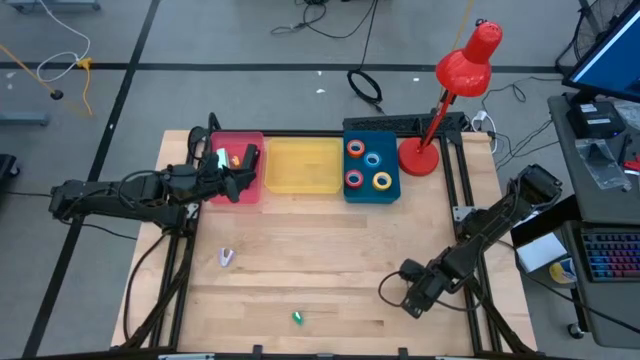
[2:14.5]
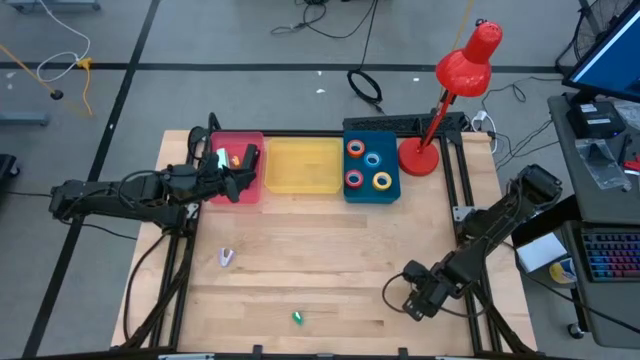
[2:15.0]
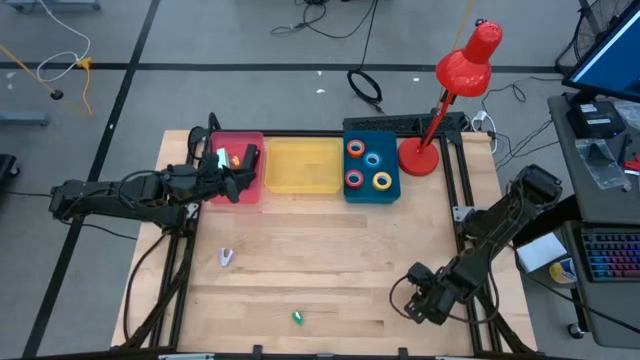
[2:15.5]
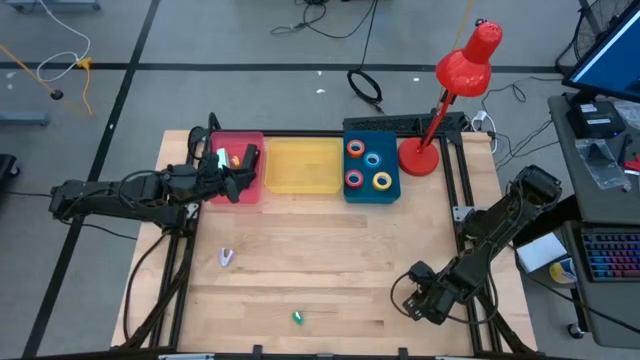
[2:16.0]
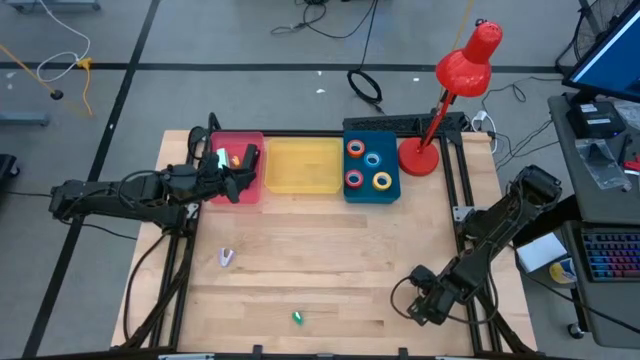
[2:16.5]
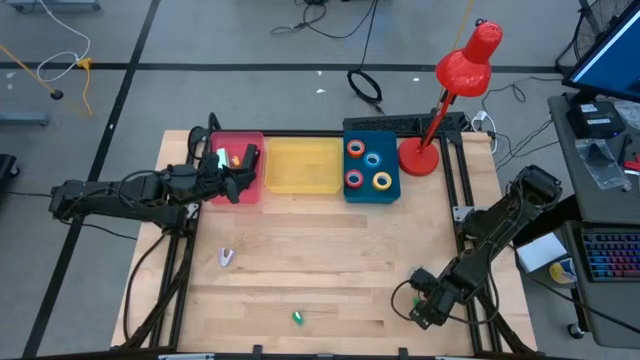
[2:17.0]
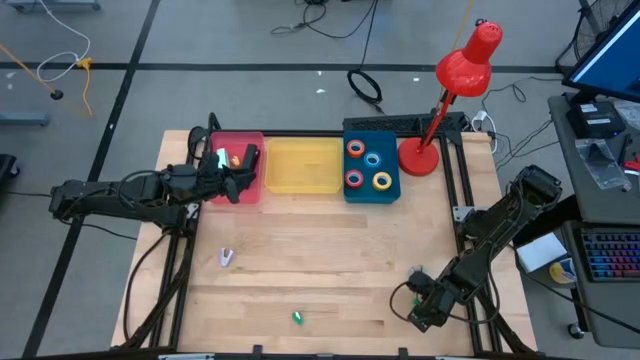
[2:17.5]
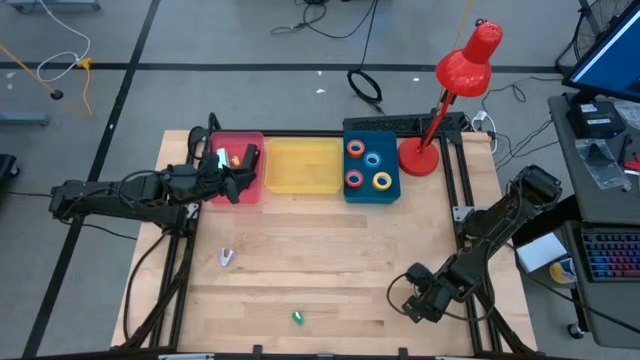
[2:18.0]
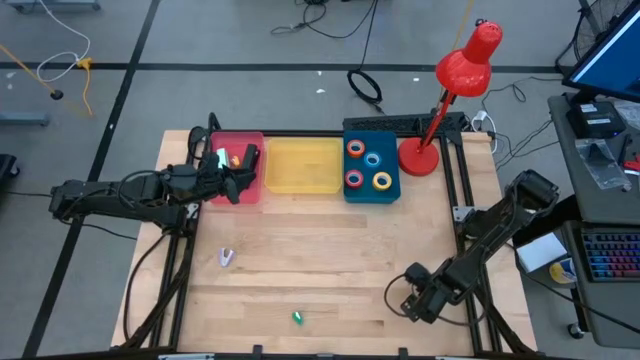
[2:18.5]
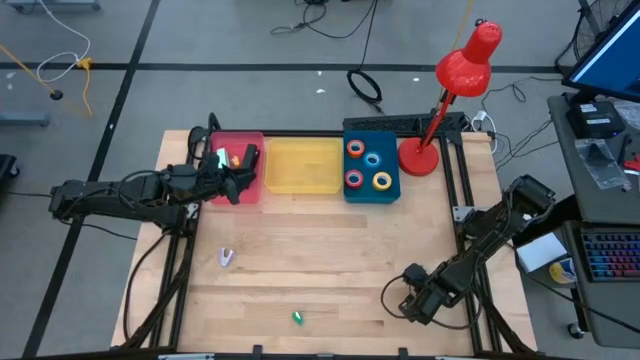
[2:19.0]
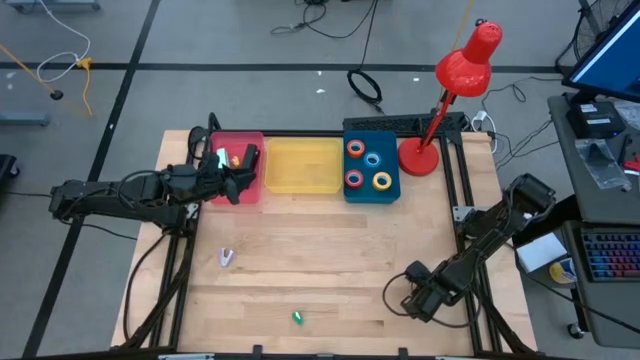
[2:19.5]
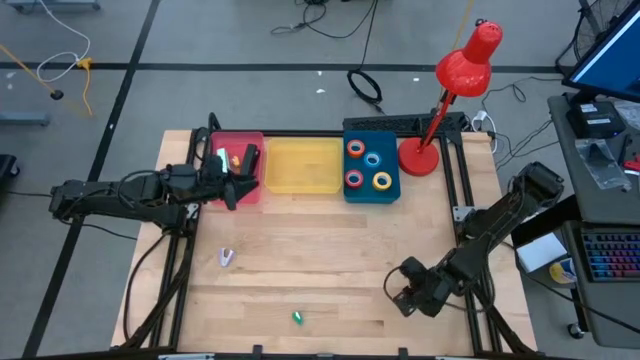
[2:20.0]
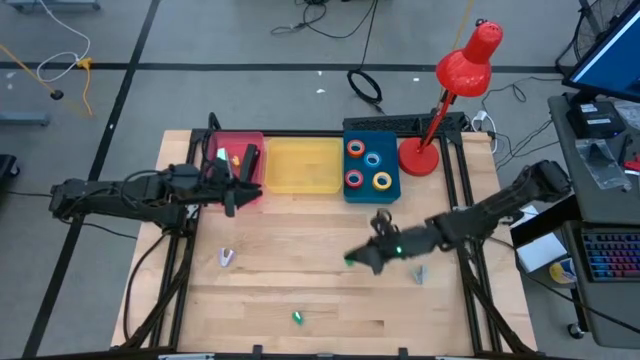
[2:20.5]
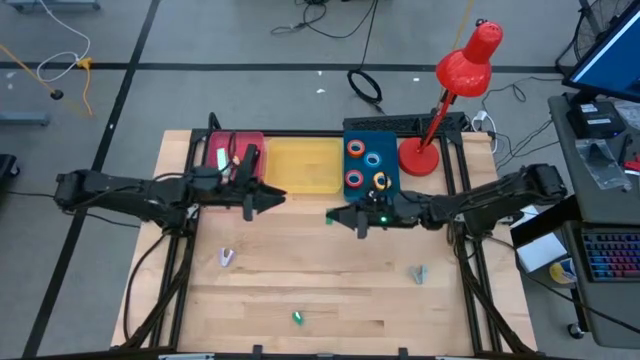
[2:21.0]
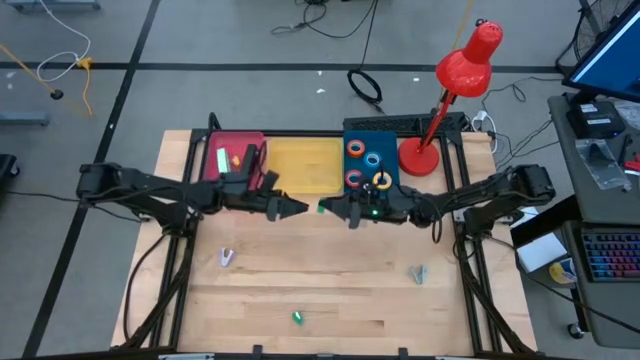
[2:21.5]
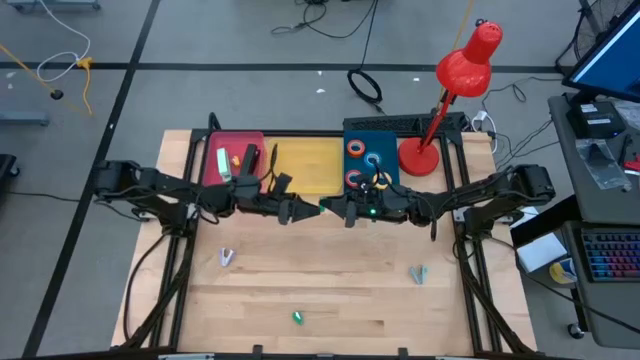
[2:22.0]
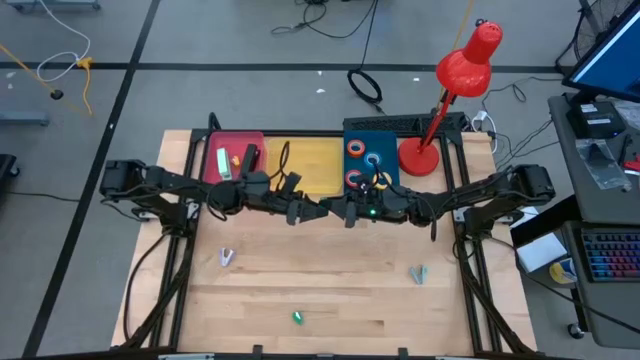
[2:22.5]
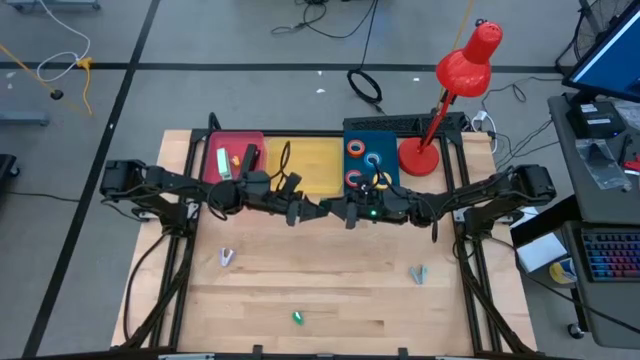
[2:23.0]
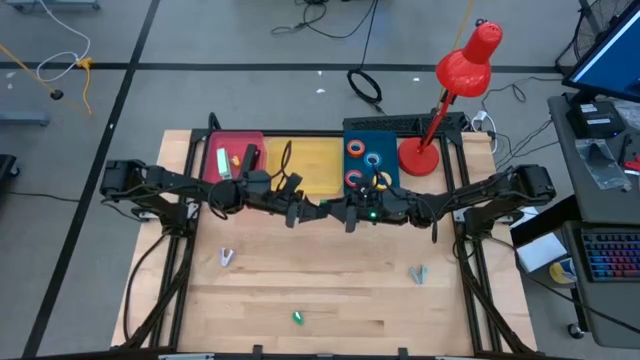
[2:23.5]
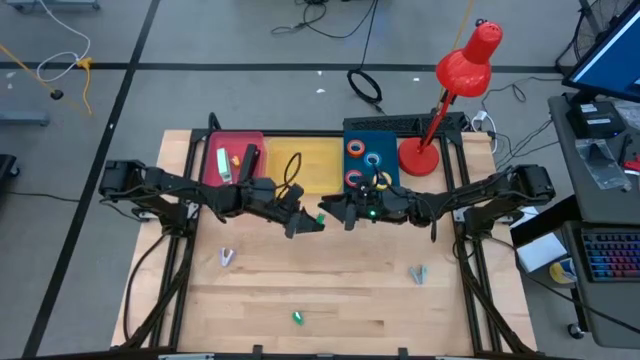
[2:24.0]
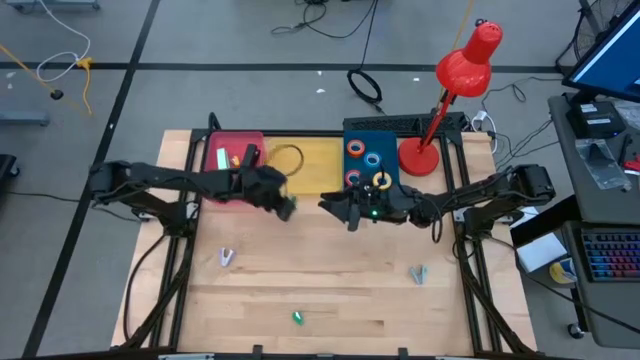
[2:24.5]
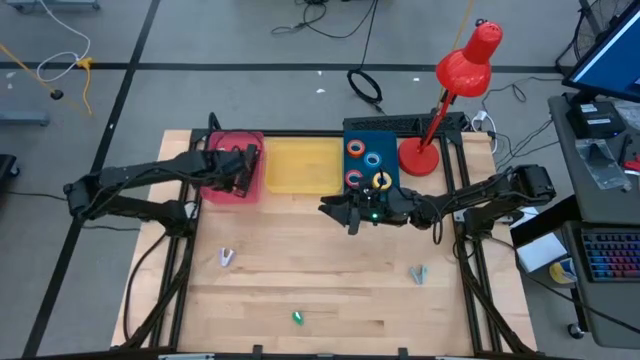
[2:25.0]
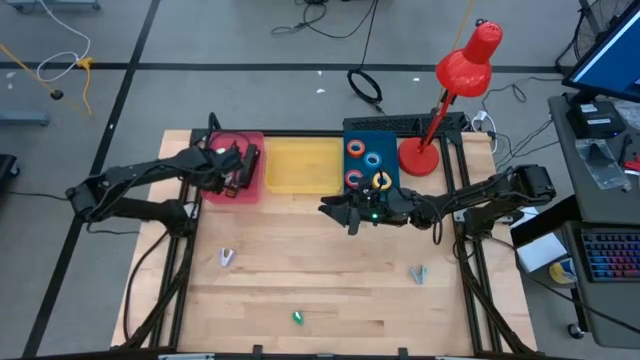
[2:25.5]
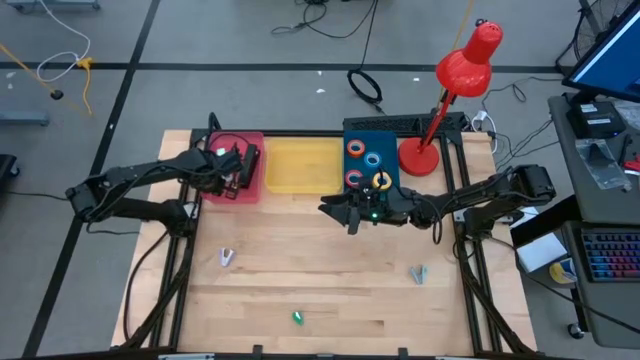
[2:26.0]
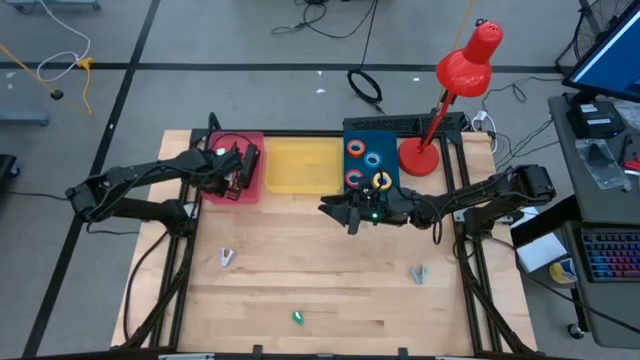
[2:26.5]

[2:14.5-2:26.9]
Task: Pick and place Stapler, Stapler remover, tape
Put the right green stapler into the red bin

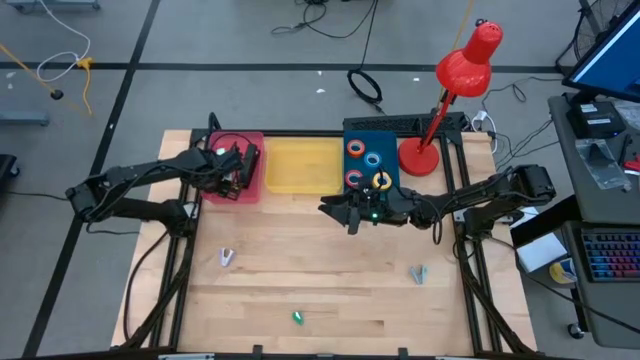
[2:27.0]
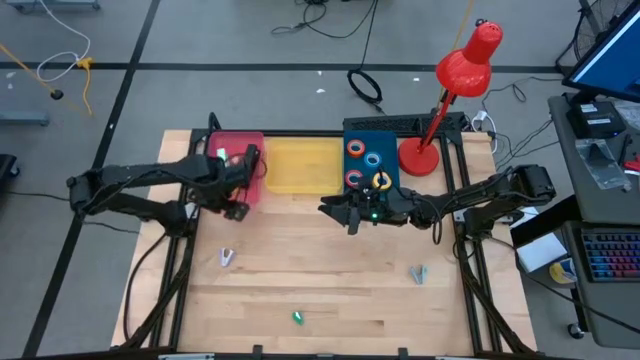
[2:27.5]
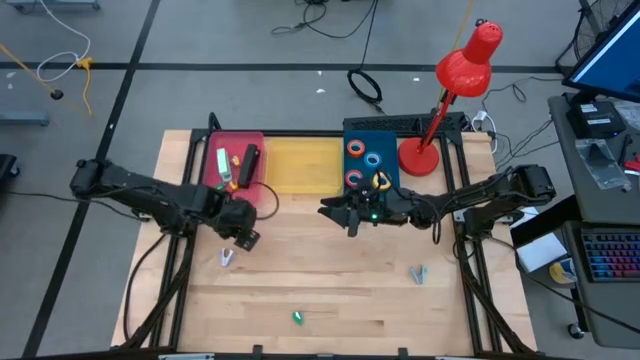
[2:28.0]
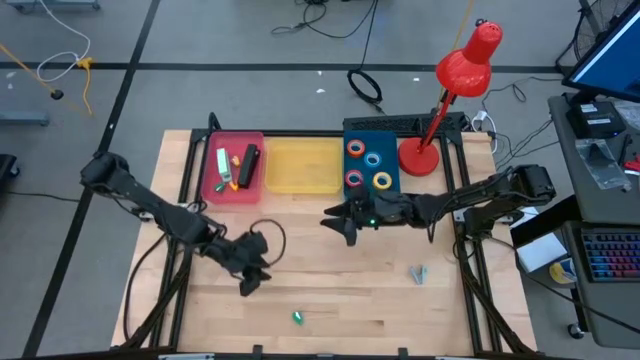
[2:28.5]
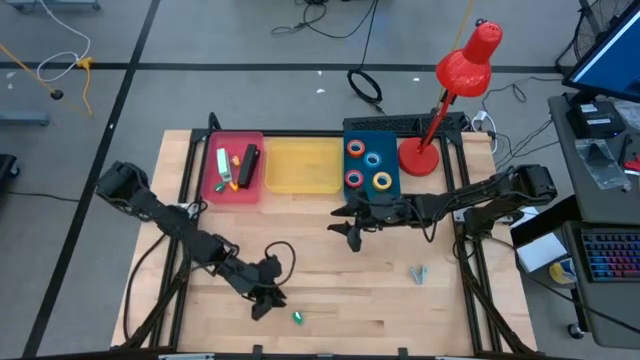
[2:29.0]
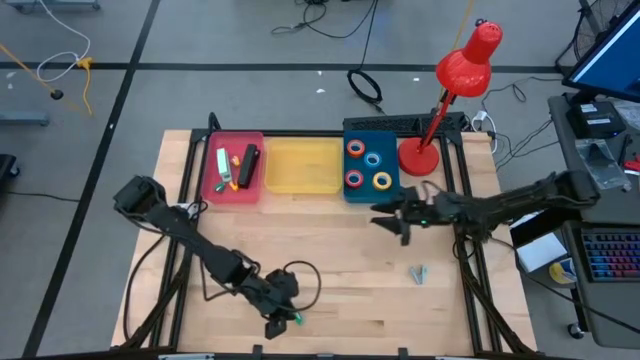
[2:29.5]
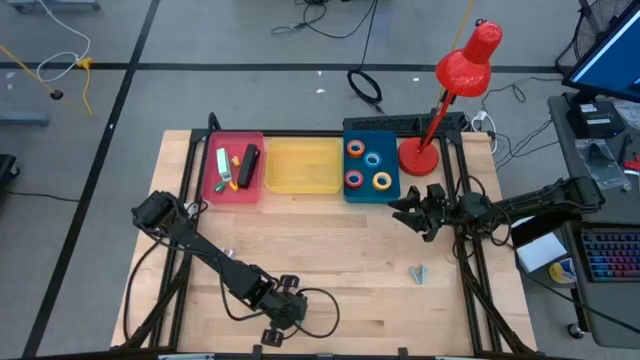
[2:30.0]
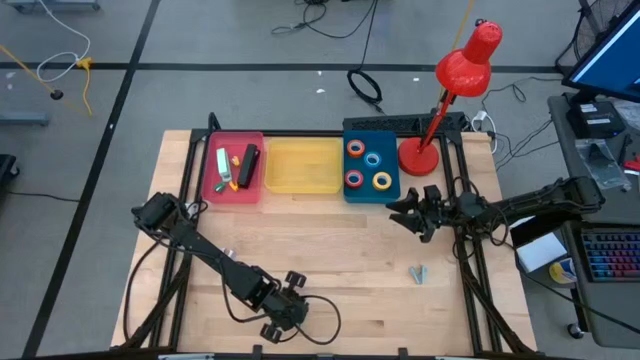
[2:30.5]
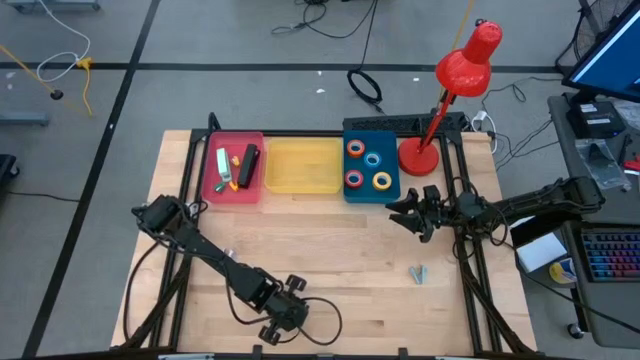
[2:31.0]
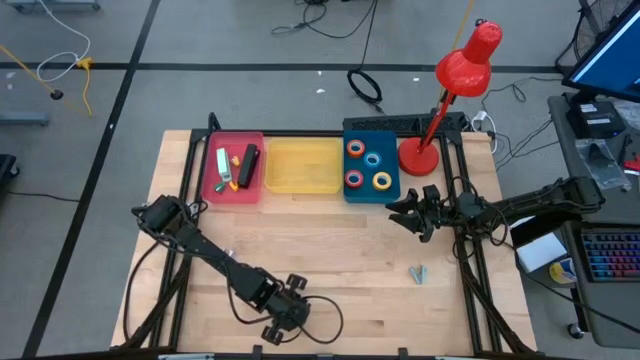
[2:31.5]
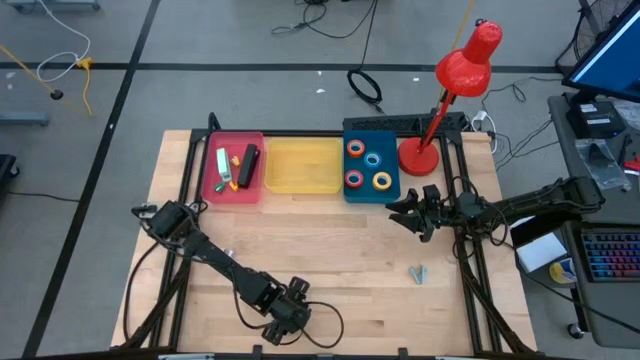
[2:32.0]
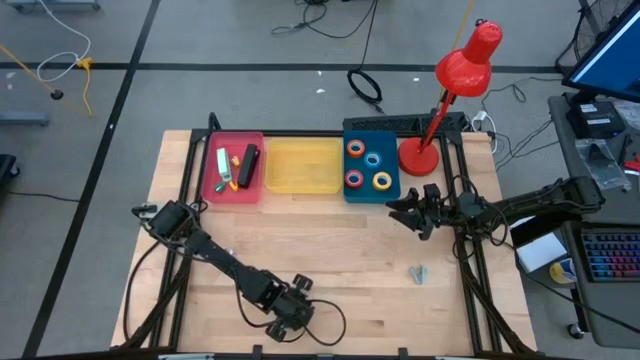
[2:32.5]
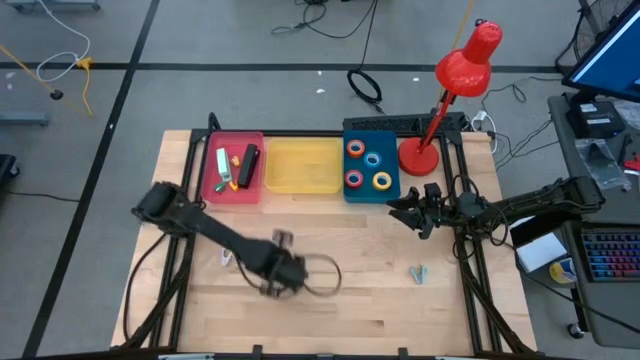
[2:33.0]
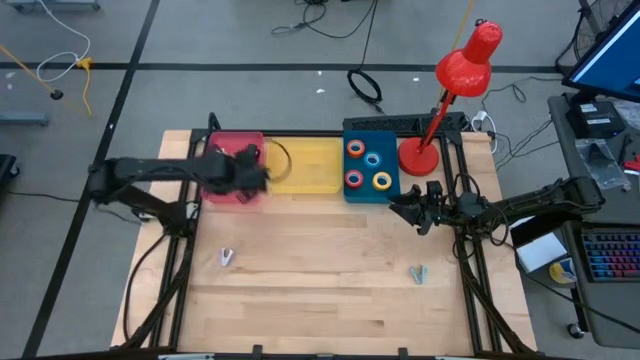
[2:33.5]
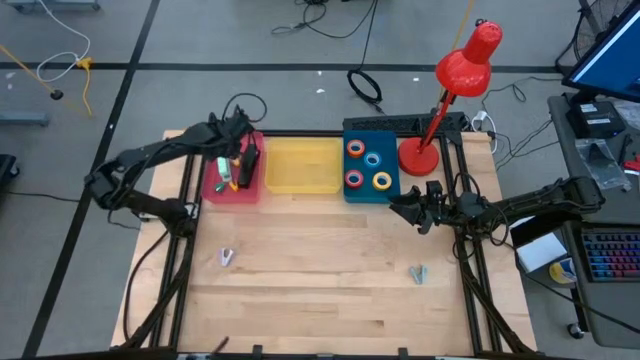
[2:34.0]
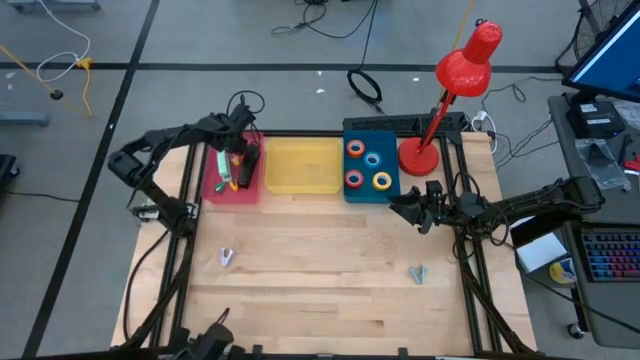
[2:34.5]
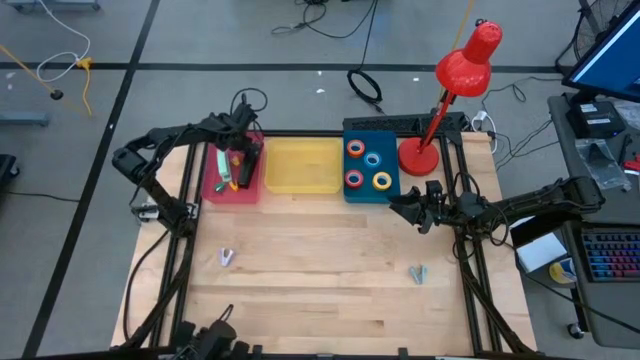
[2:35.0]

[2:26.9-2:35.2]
Put the green stapler into the red bin
